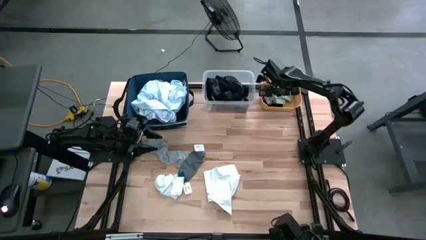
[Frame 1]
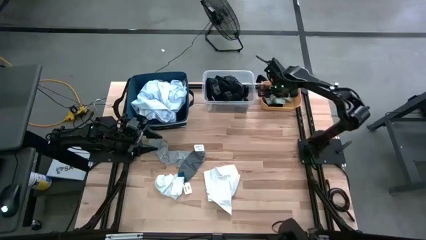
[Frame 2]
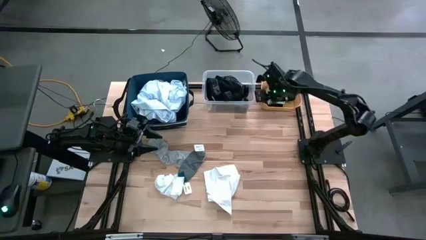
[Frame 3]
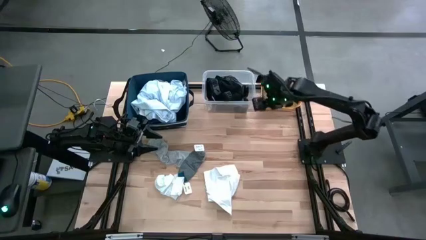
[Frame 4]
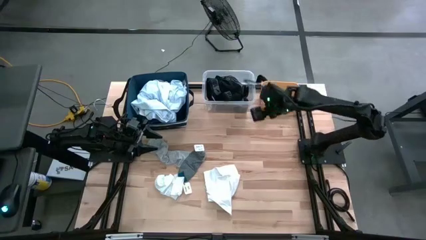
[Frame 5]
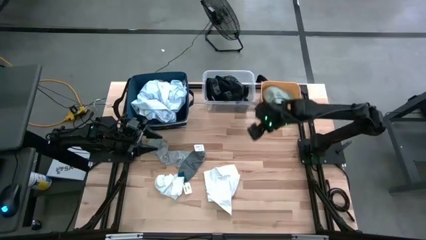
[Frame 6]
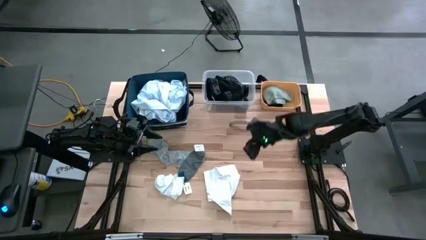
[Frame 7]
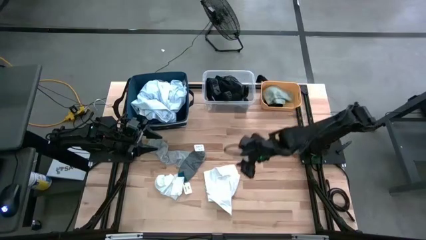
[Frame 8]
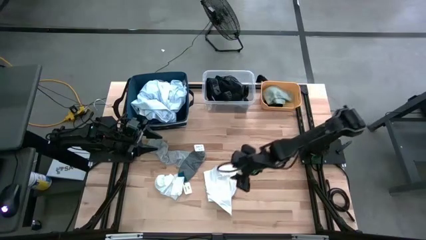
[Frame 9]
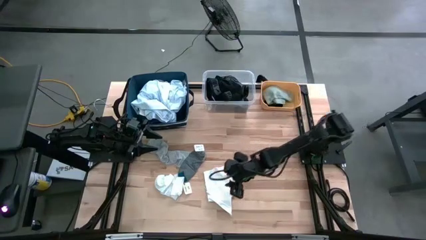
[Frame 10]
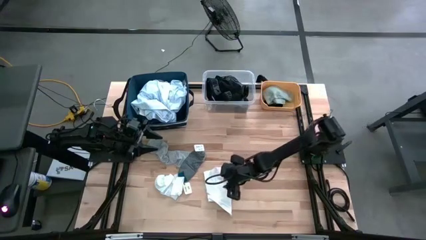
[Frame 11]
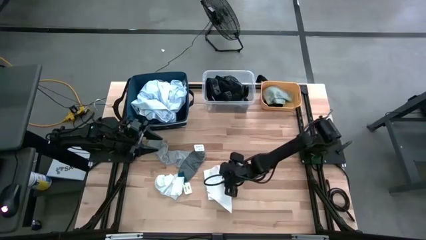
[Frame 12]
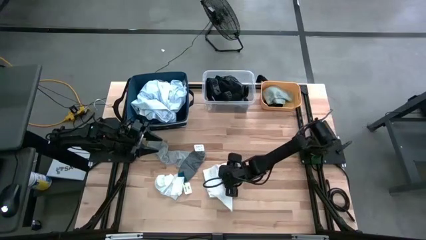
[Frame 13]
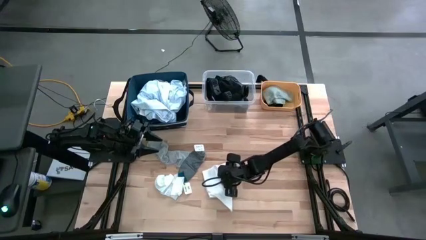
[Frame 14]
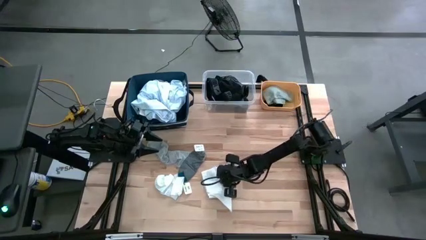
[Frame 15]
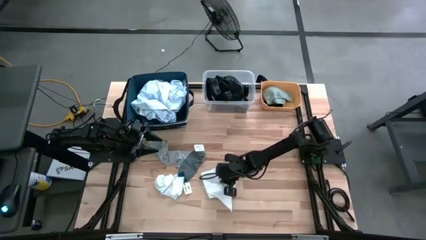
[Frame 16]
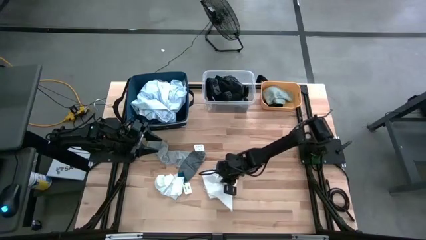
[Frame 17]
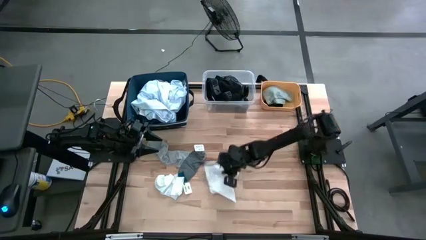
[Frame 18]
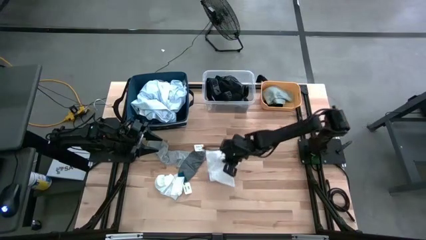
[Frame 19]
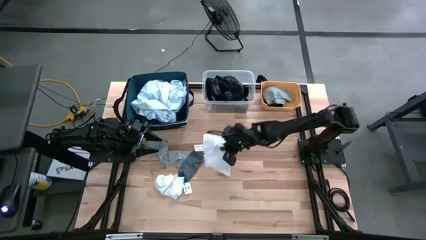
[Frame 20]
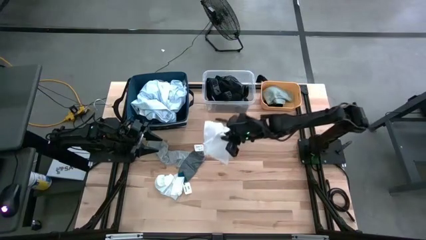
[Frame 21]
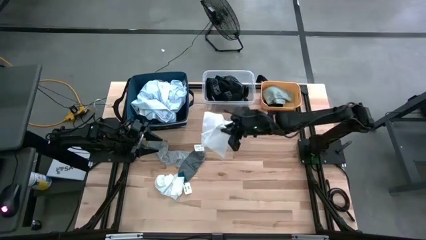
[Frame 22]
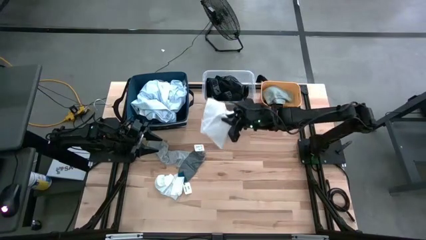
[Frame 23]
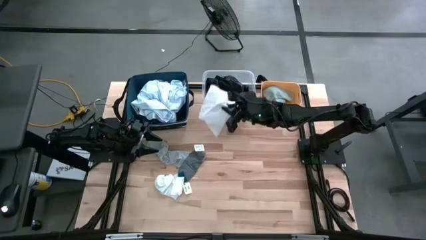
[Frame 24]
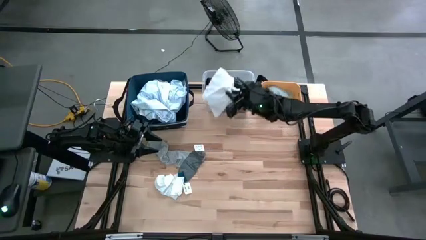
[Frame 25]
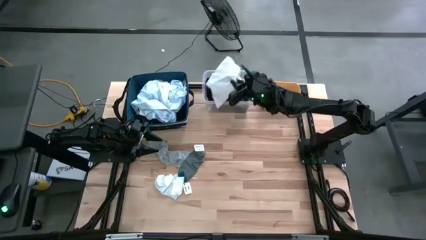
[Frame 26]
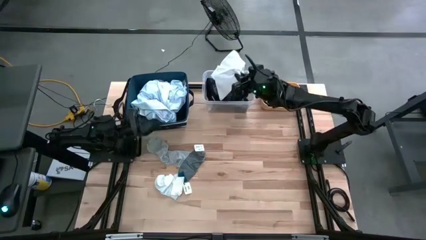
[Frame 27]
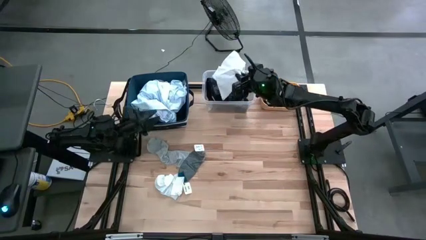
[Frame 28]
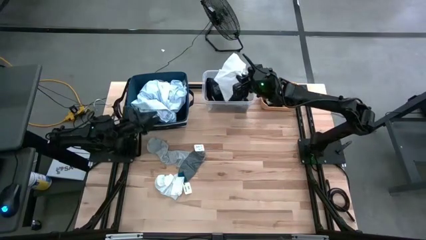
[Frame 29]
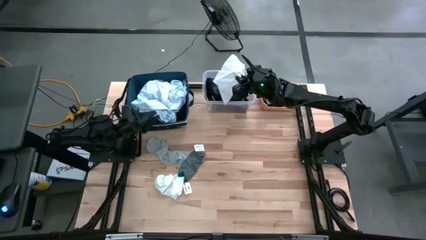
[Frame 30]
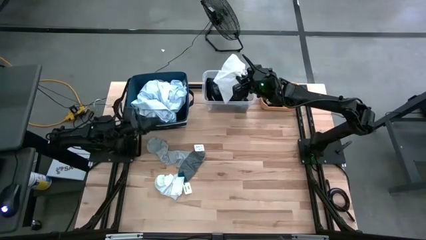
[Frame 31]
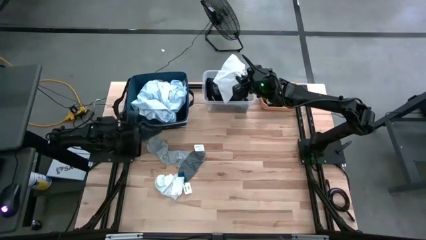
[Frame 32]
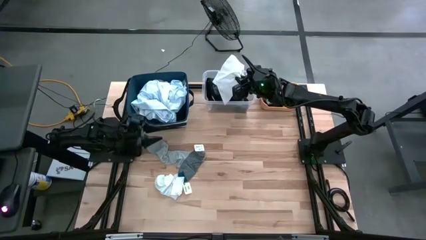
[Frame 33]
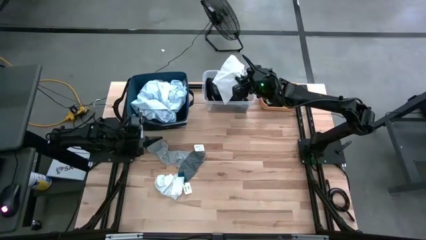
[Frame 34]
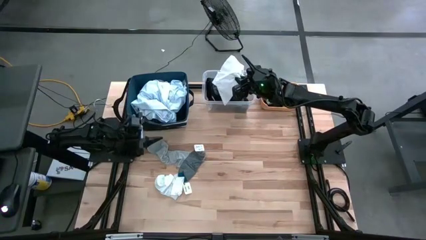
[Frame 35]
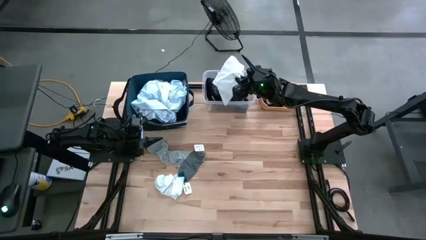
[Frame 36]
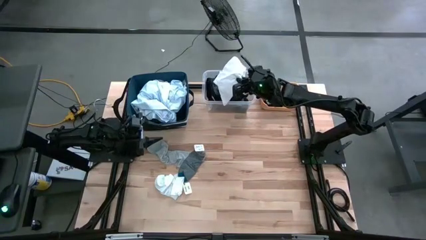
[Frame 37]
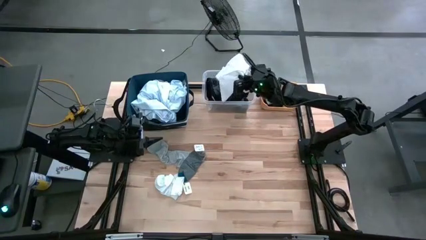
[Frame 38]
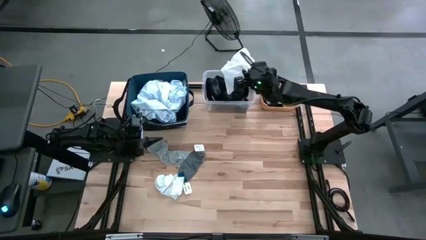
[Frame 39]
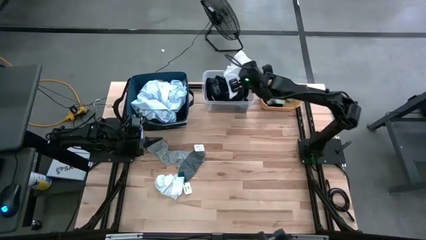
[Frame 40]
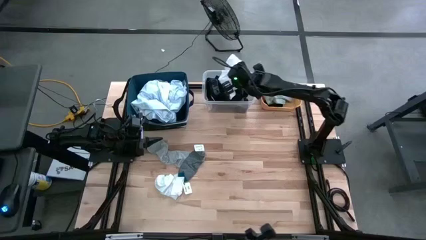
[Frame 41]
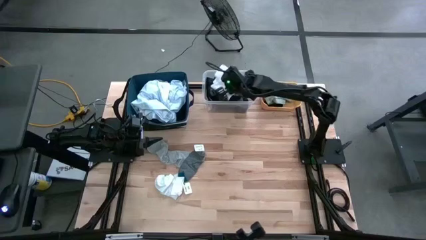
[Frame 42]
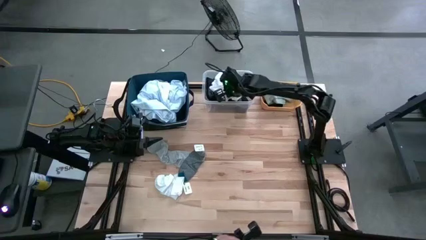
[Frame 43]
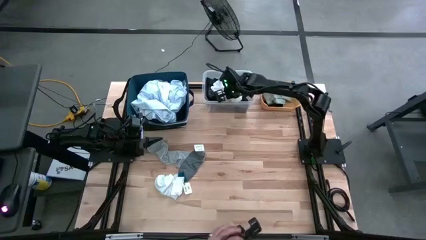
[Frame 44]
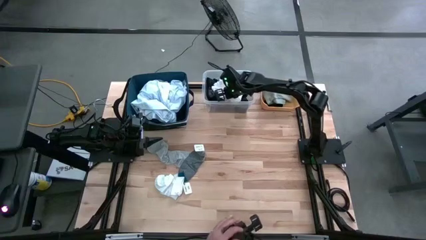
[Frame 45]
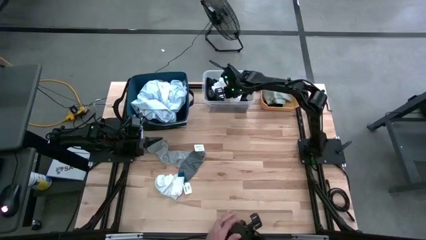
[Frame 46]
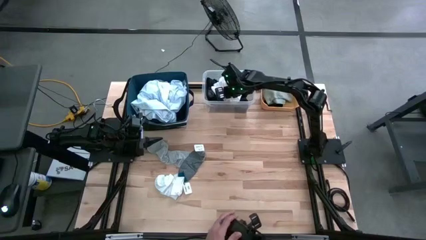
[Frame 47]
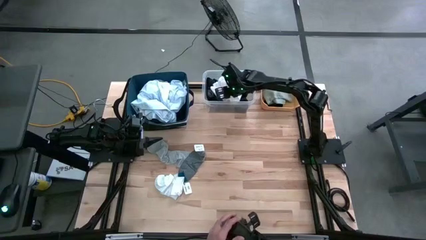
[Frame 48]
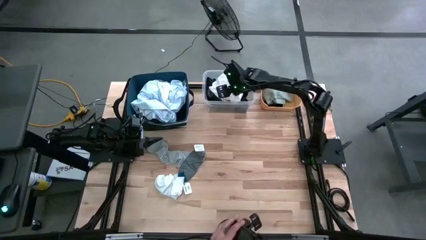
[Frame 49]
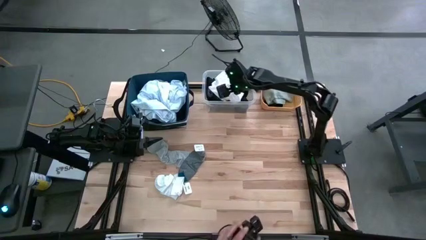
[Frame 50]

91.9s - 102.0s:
Task: Pick & Place Cloths
Put the white pants into the transparent bin

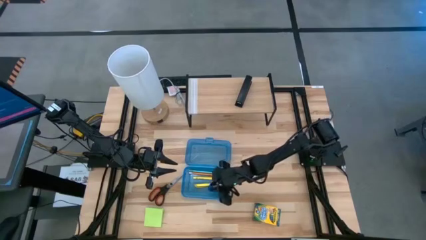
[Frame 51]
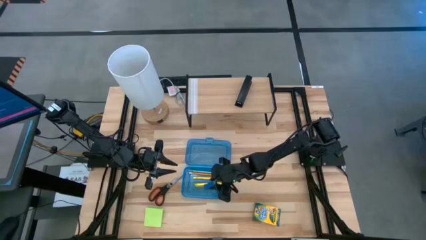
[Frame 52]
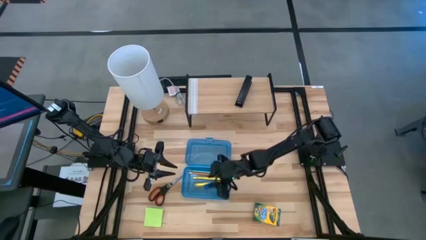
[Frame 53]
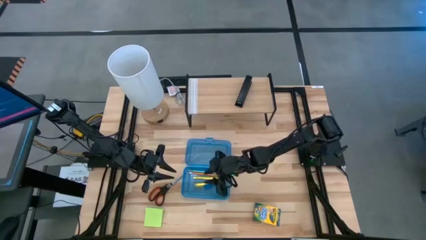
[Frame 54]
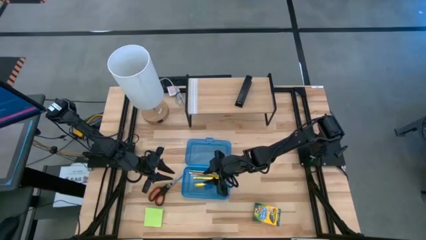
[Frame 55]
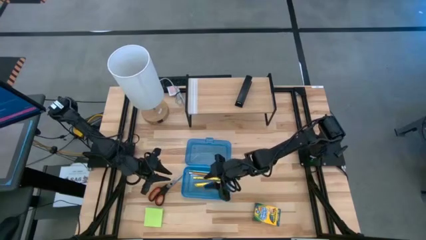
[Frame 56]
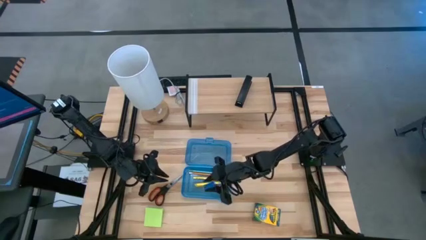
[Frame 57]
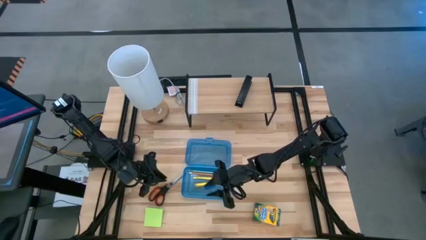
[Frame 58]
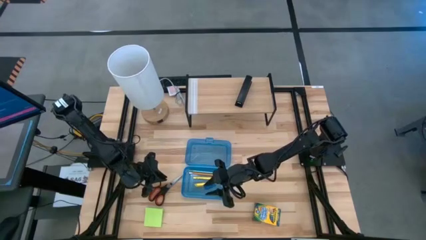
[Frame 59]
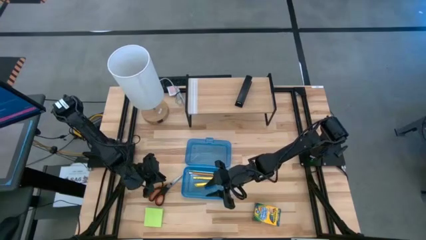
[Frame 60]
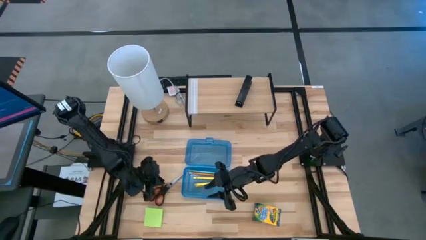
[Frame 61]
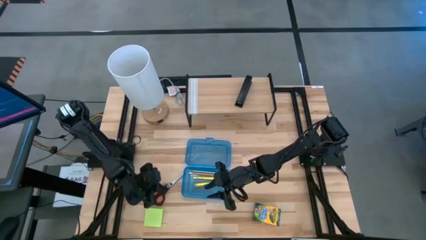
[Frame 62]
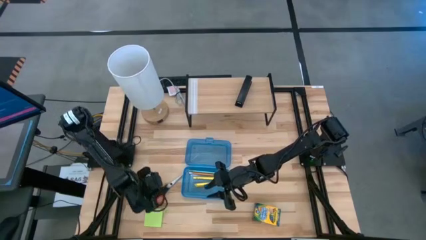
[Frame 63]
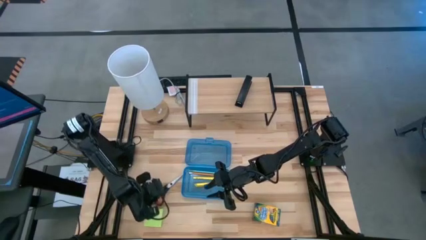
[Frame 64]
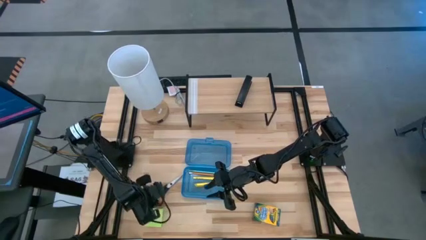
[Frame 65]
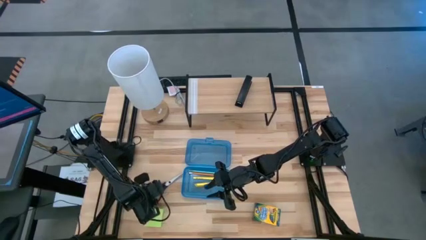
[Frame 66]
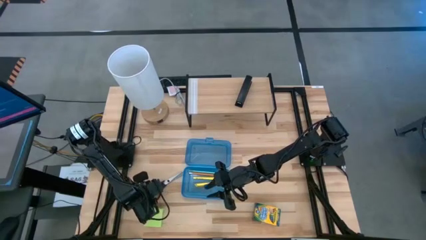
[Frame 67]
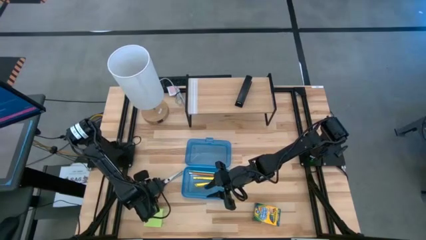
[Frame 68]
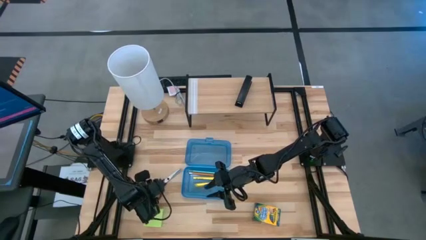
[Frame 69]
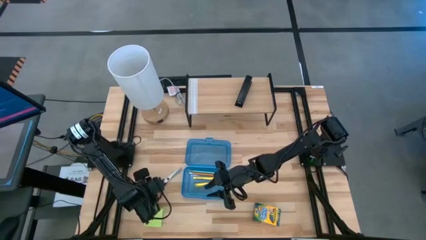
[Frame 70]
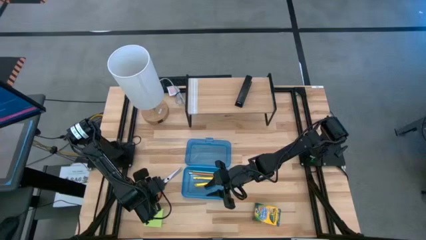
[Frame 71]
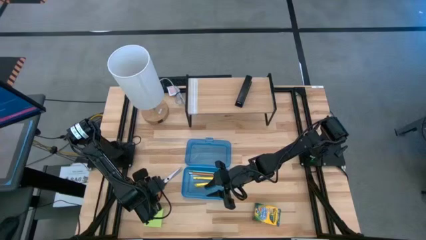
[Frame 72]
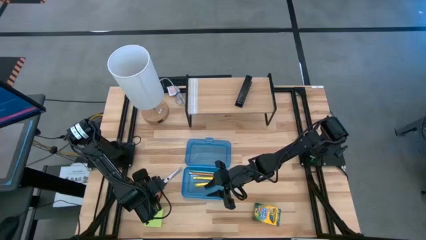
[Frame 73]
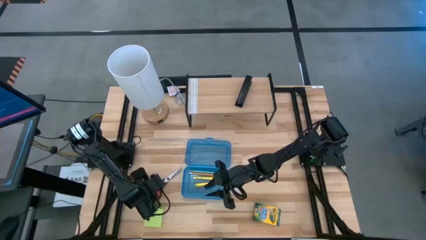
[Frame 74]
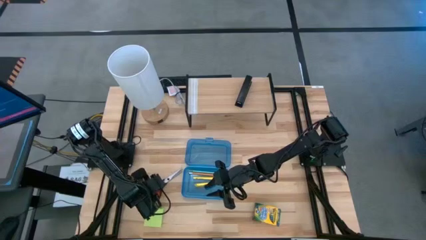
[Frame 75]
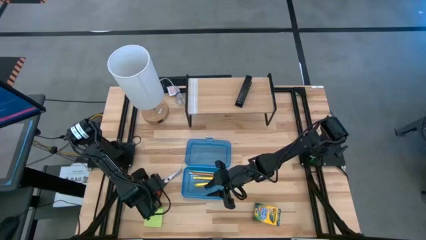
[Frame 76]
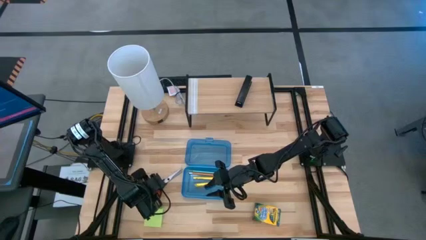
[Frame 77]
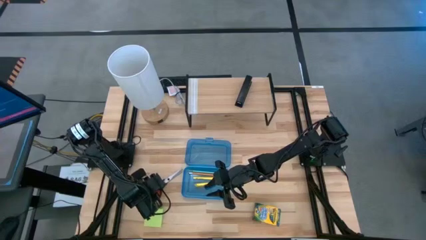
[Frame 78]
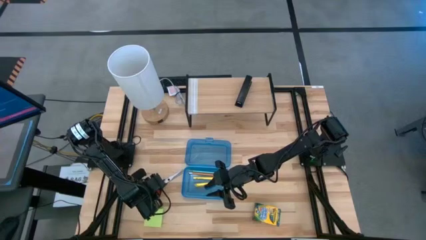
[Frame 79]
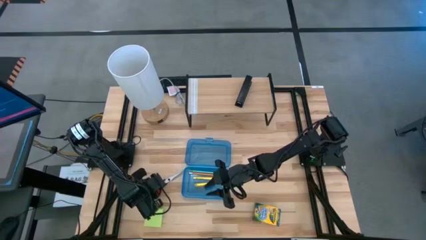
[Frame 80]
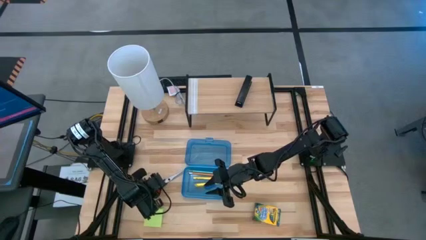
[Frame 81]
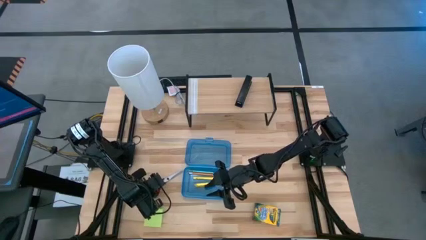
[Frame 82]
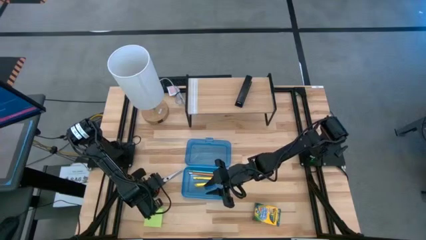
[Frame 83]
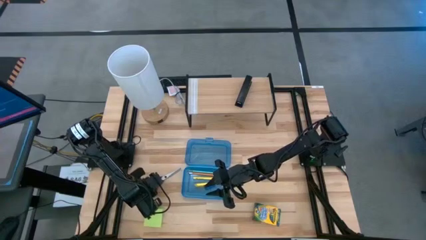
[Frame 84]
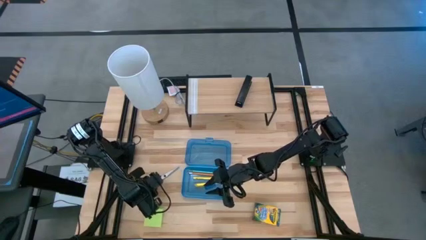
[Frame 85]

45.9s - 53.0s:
Task: Pack school essentials
Put the scissors into the supply box
